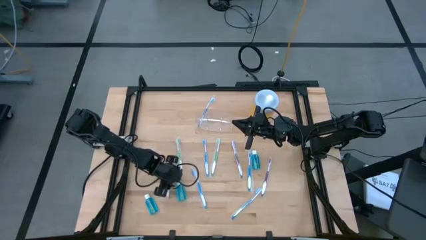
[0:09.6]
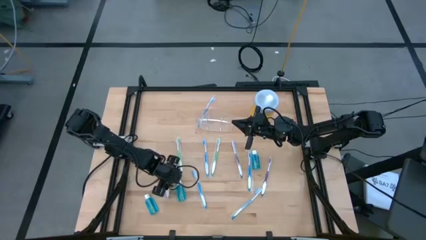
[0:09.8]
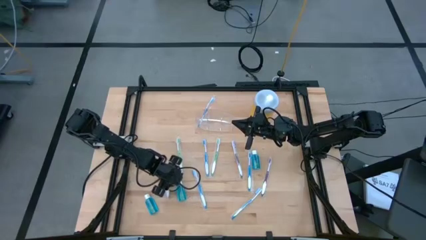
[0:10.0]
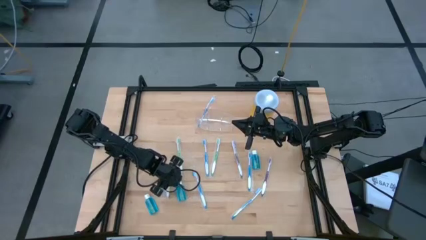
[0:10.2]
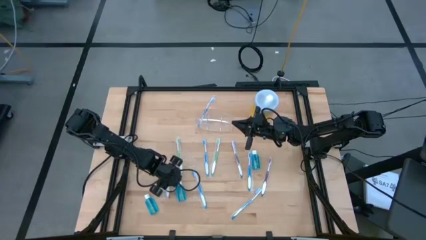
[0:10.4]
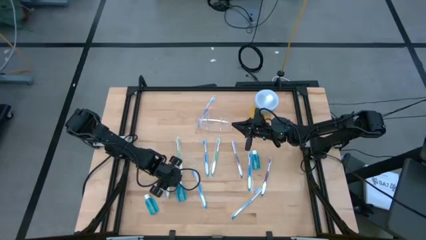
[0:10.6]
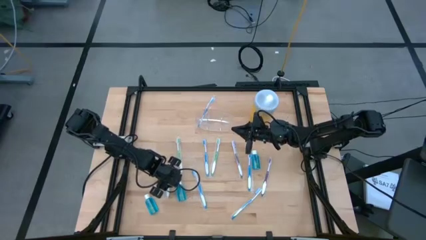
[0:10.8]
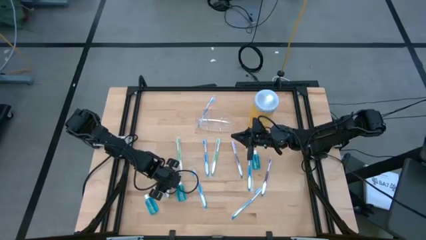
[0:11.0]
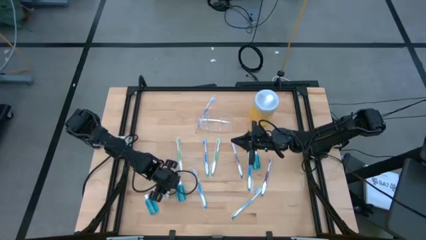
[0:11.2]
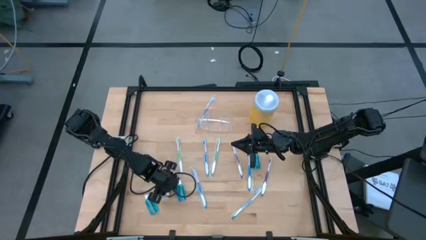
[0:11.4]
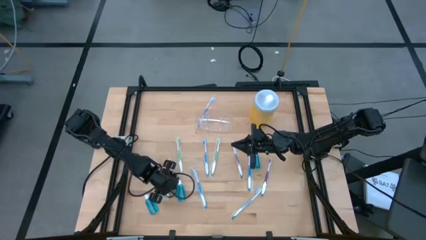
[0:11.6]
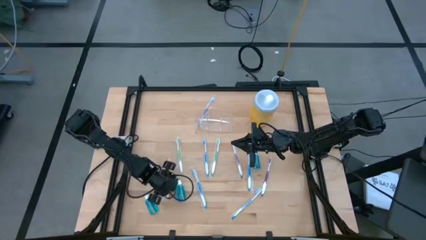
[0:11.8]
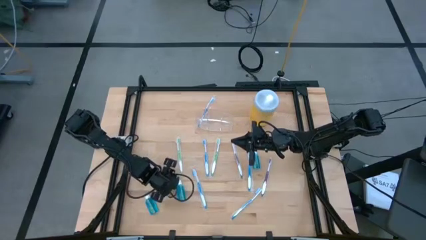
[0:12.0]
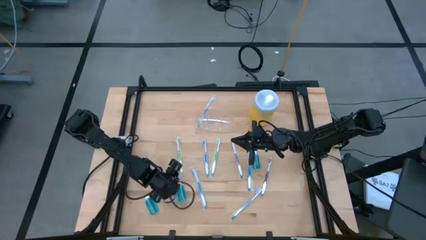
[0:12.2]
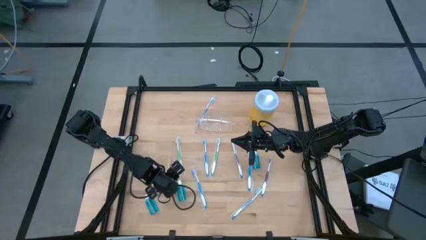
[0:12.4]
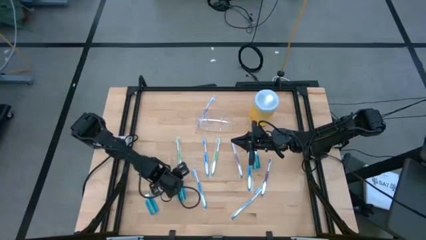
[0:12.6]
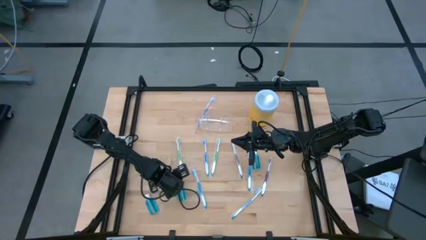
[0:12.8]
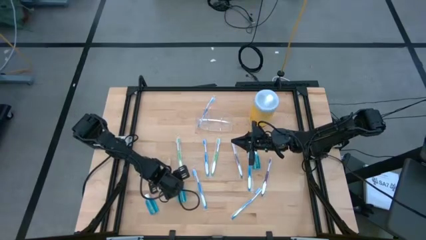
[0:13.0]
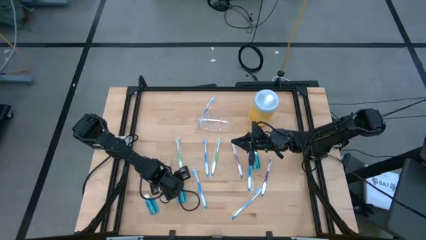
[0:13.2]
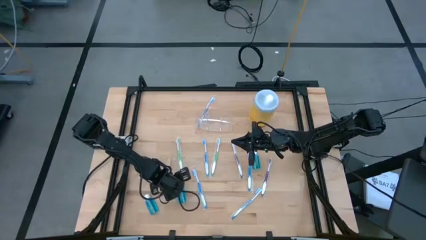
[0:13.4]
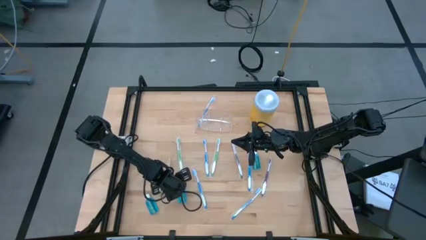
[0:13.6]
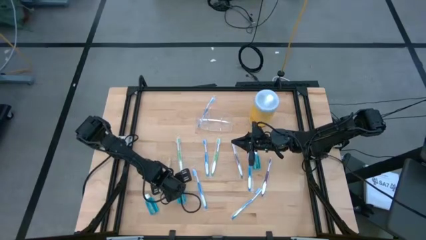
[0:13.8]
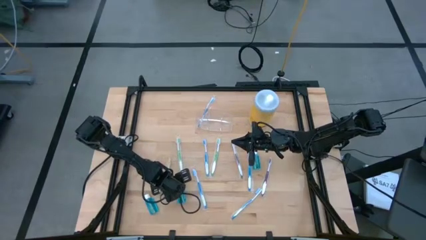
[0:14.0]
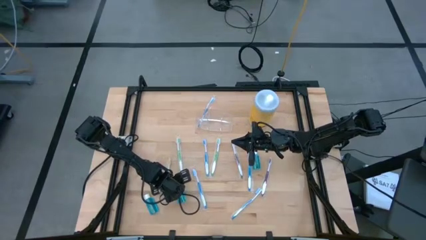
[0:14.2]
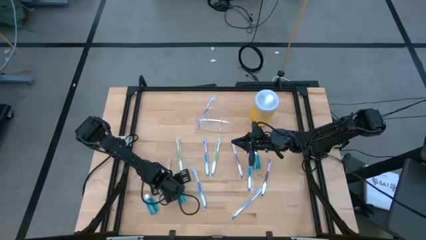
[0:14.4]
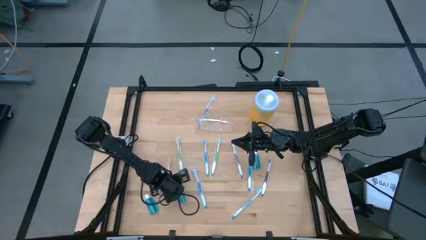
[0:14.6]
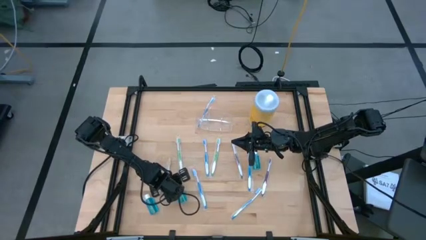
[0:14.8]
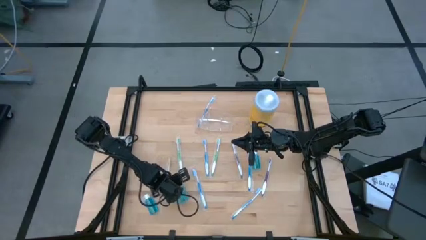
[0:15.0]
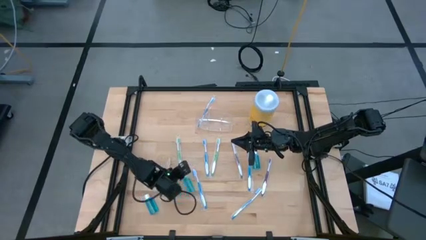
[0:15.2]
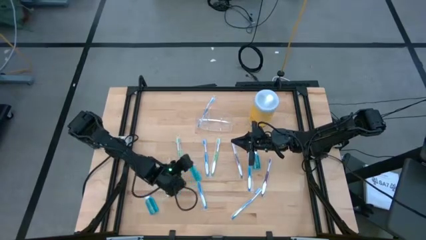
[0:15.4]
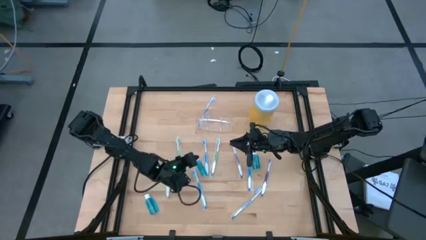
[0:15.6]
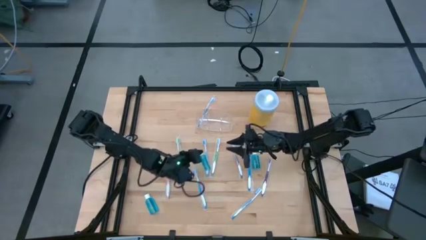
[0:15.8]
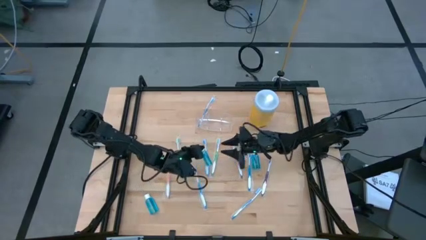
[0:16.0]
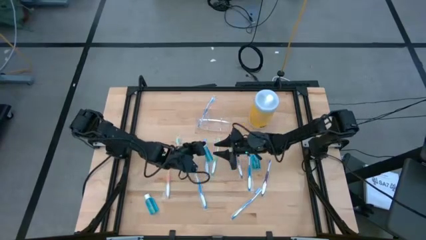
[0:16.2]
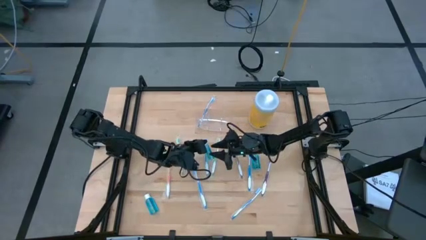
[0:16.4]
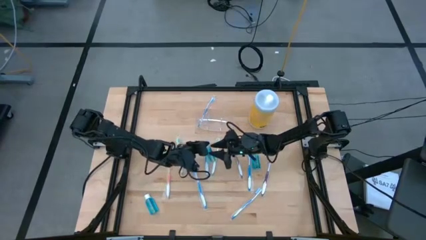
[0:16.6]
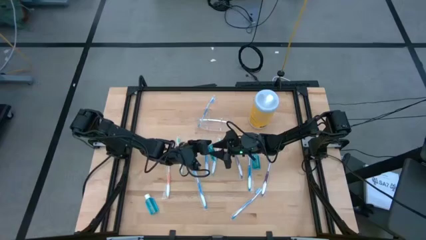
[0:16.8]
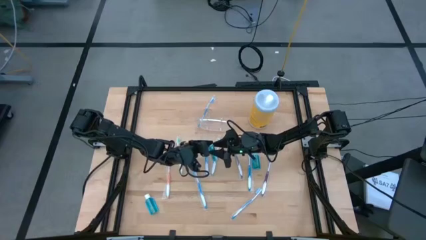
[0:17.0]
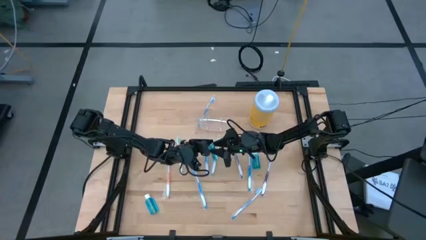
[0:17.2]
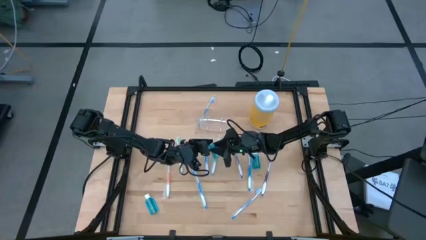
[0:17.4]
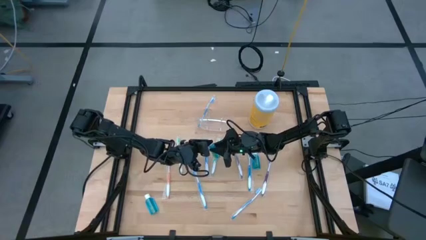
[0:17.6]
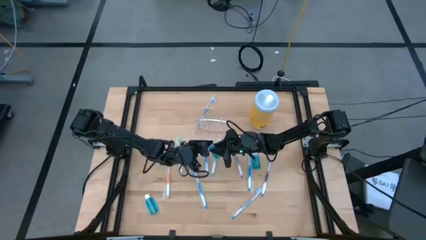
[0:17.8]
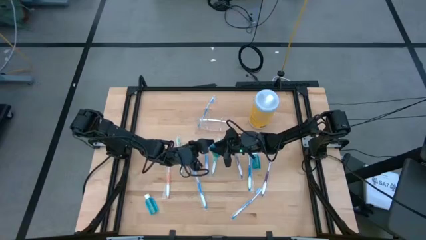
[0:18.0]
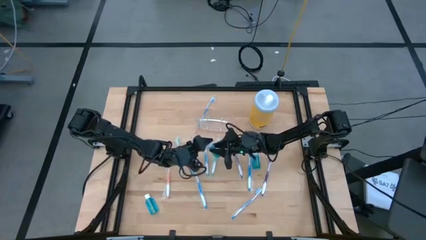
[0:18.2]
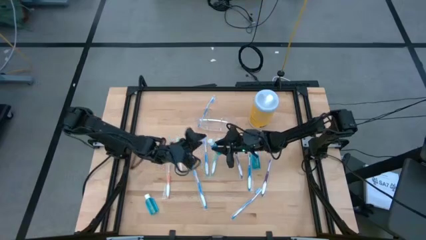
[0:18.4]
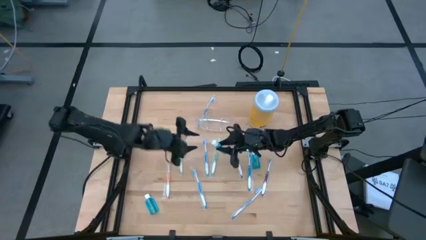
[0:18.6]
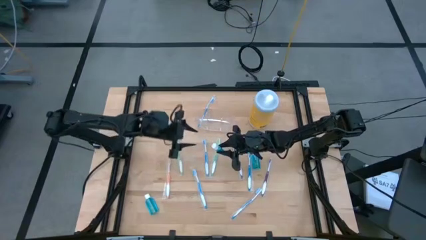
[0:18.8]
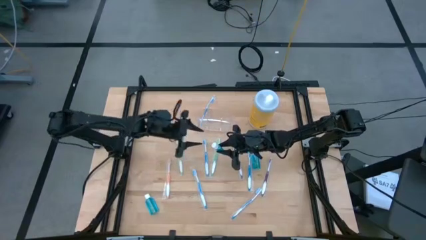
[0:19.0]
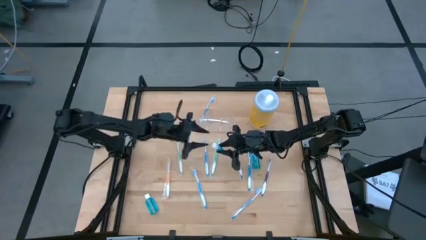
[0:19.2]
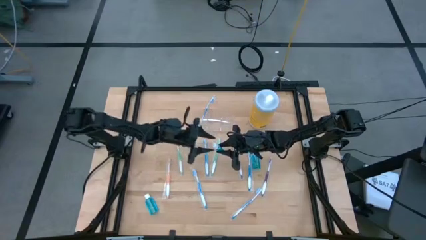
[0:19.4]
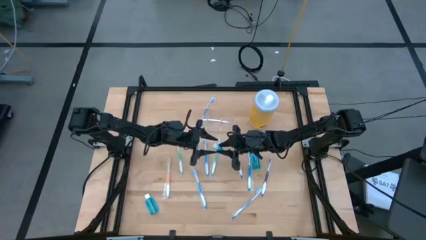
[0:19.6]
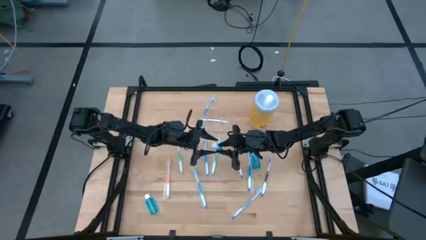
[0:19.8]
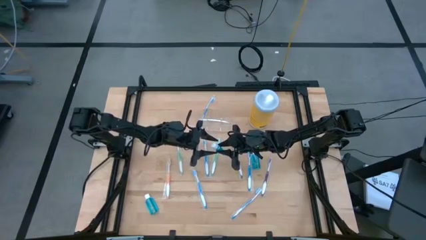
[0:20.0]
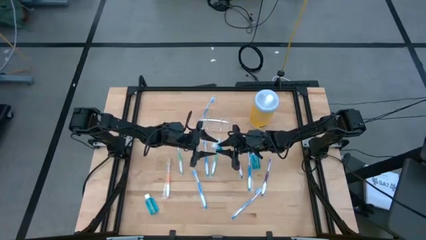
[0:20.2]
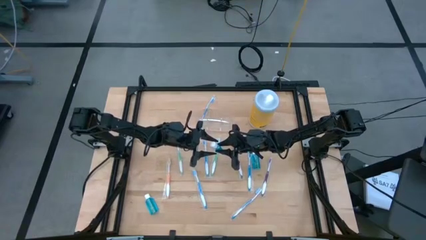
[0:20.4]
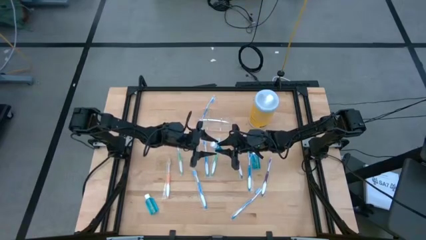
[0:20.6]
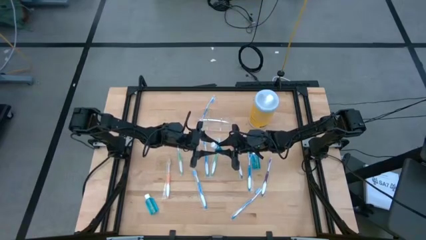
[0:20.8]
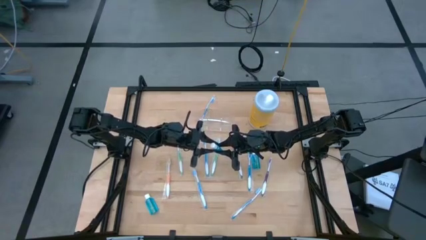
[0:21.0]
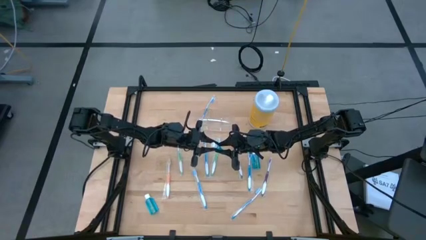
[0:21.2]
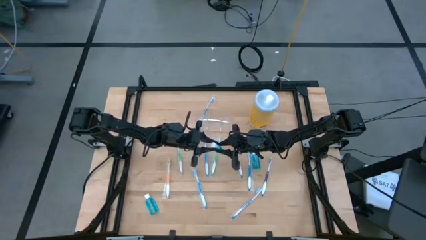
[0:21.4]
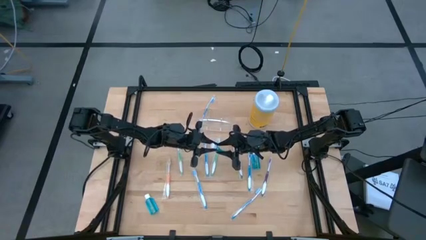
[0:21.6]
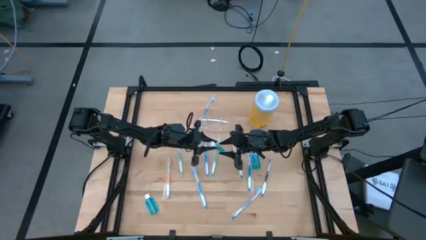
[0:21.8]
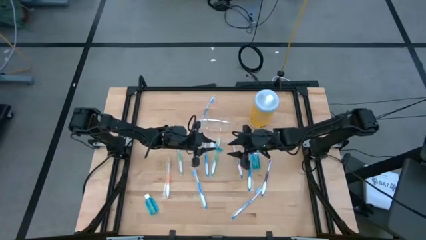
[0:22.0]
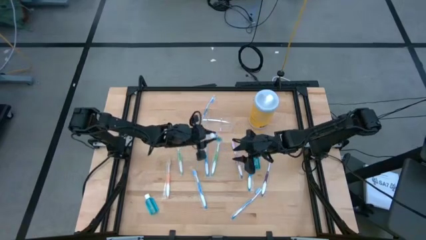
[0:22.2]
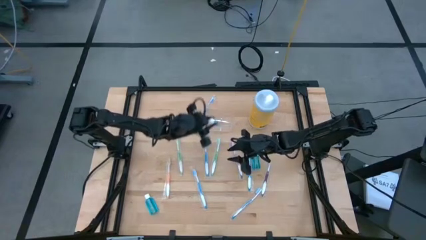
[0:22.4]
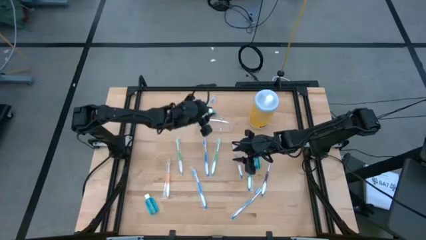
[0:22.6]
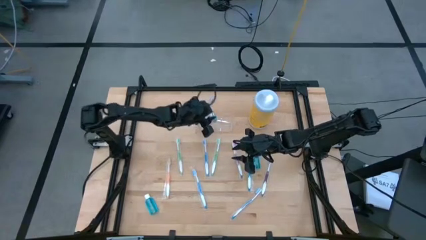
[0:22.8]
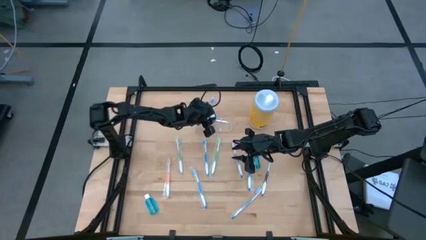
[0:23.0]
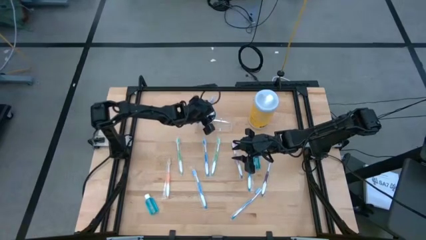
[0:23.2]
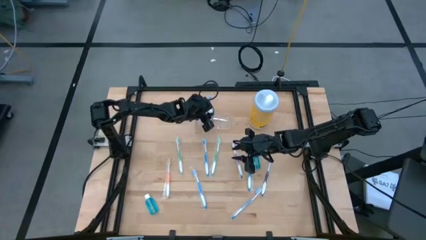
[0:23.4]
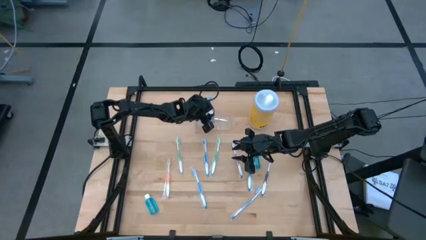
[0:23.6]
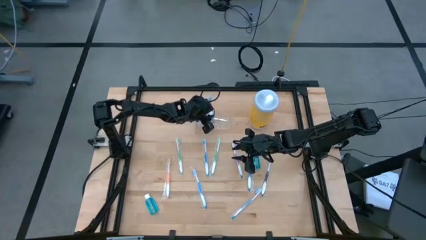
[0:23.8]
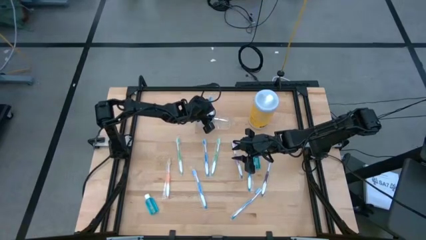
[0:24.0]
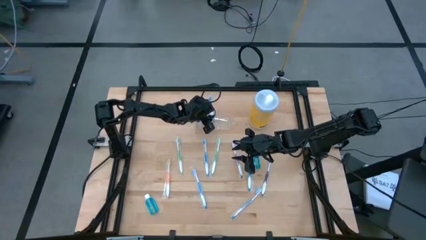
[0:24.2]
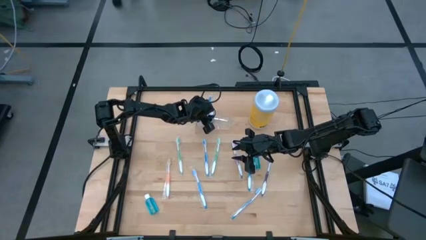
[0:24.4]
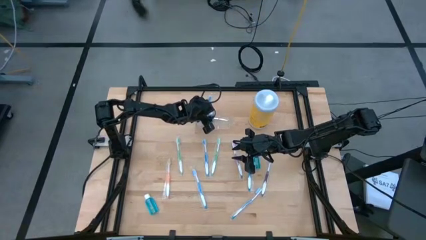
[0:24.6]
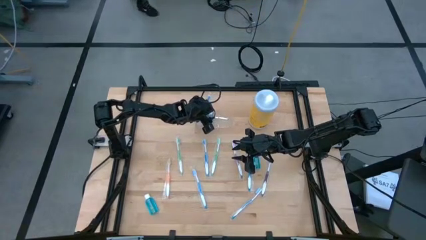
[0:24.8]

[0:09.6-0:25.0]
Task: Pick & Place toothbrushing station
Put the blue mouthwash into the middle compartment of the transparent organizer
